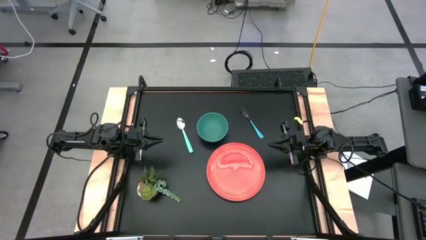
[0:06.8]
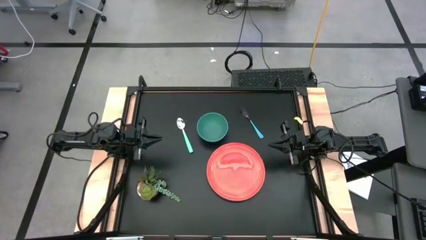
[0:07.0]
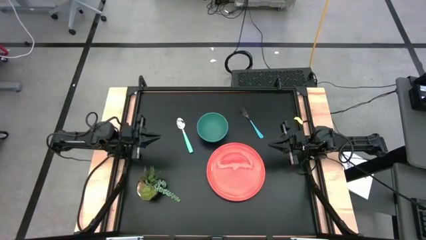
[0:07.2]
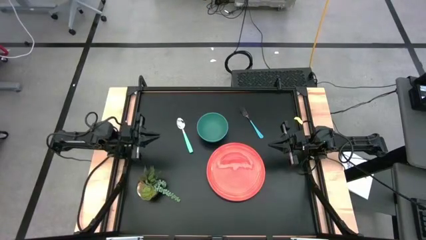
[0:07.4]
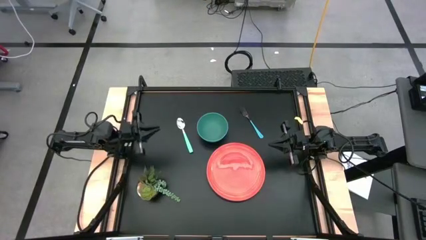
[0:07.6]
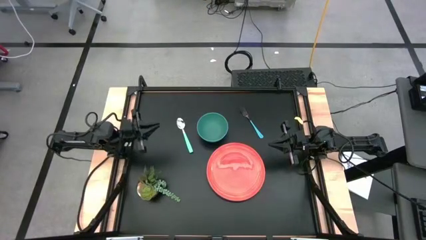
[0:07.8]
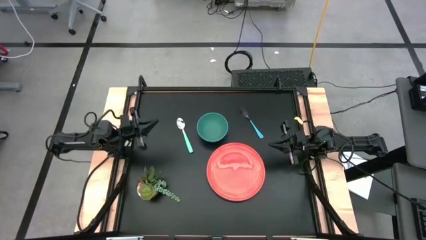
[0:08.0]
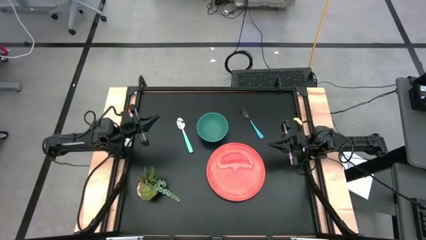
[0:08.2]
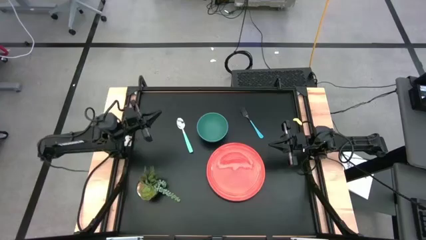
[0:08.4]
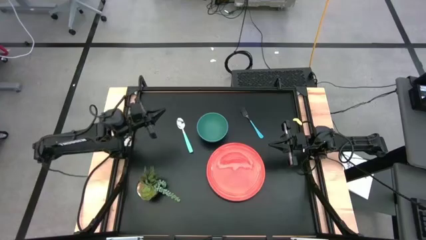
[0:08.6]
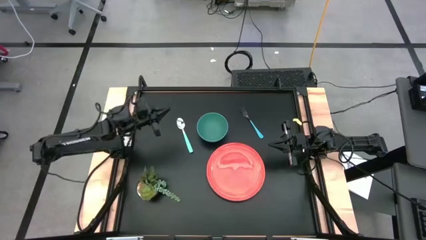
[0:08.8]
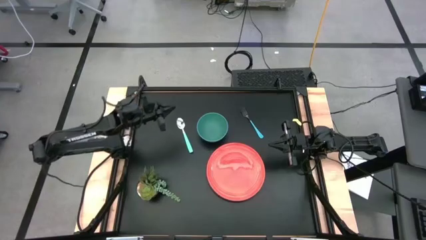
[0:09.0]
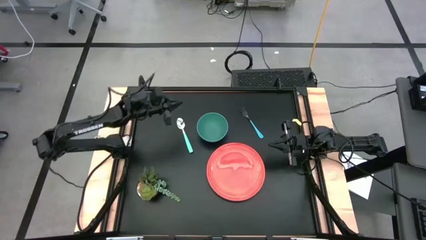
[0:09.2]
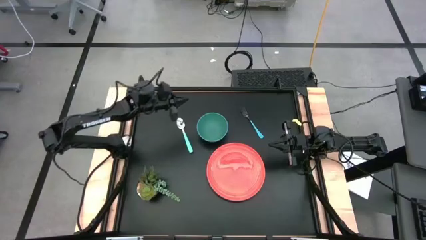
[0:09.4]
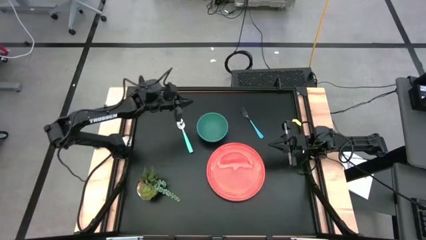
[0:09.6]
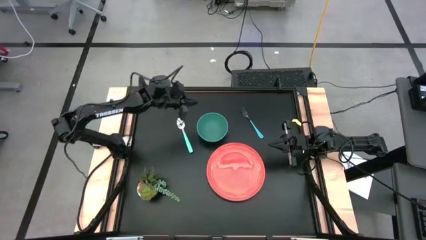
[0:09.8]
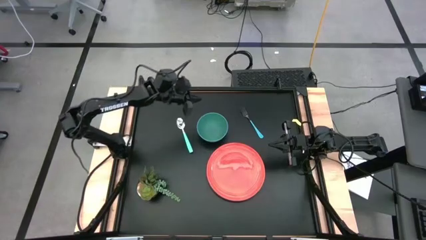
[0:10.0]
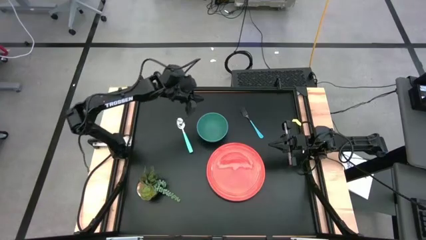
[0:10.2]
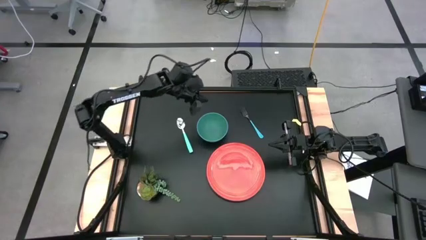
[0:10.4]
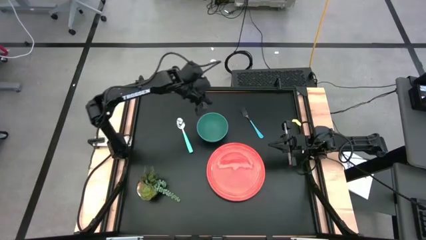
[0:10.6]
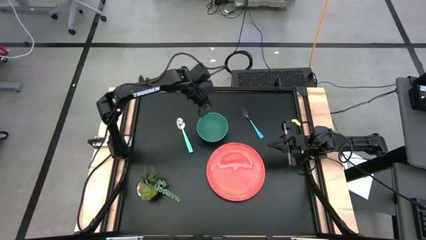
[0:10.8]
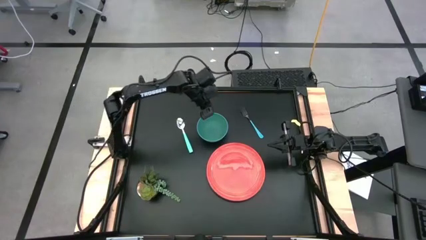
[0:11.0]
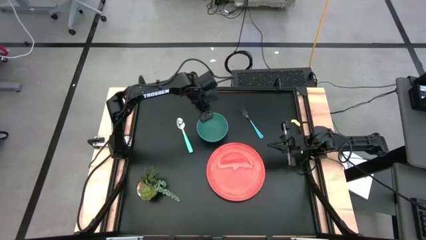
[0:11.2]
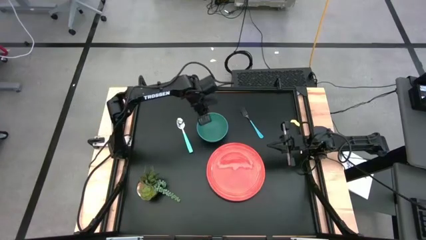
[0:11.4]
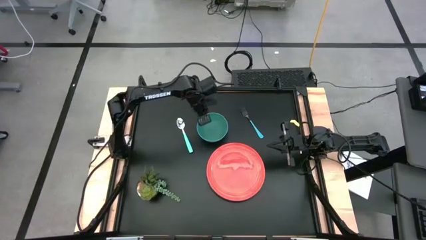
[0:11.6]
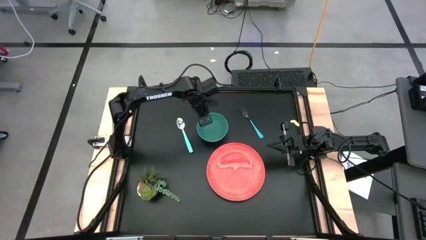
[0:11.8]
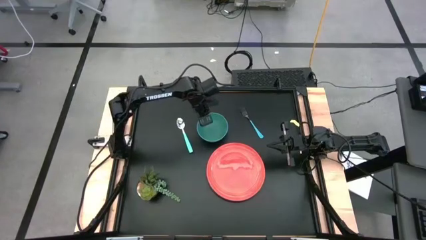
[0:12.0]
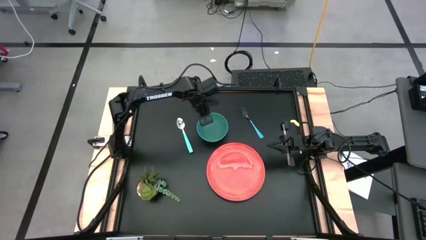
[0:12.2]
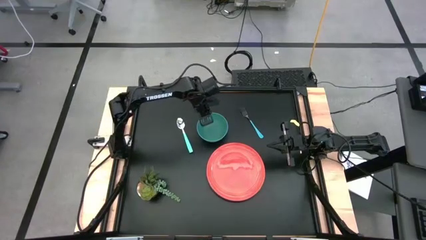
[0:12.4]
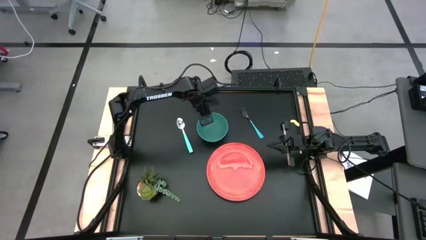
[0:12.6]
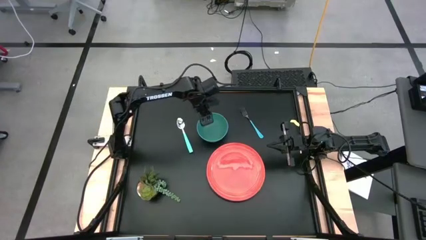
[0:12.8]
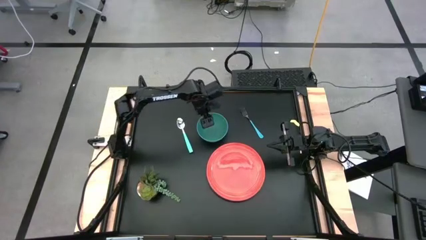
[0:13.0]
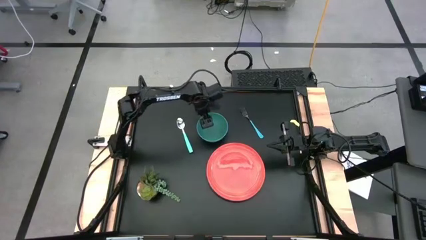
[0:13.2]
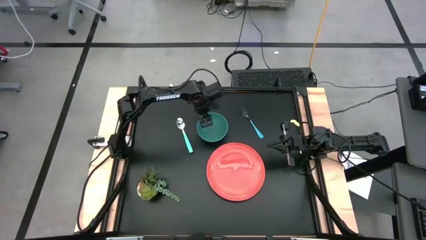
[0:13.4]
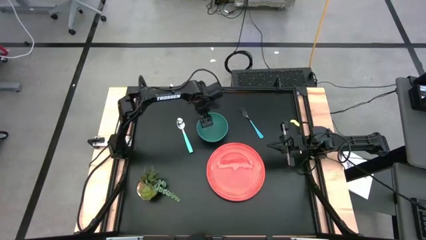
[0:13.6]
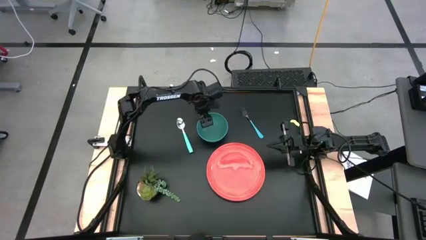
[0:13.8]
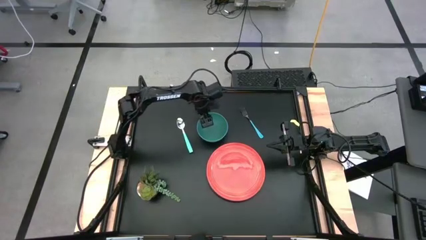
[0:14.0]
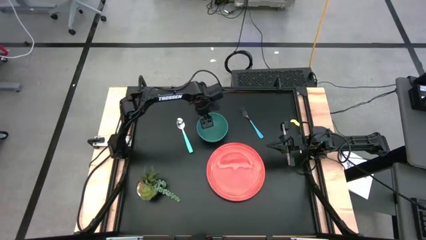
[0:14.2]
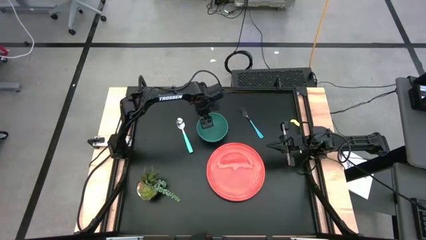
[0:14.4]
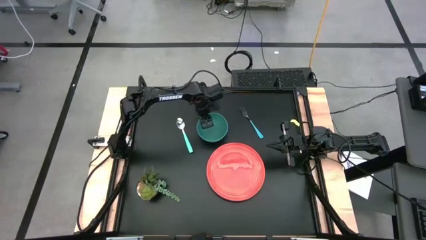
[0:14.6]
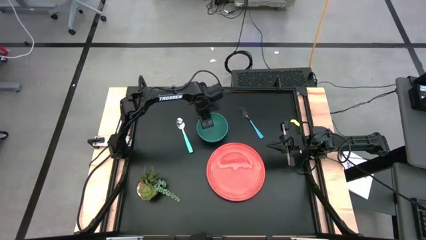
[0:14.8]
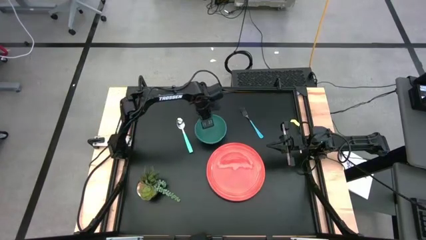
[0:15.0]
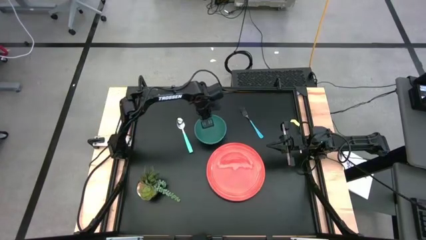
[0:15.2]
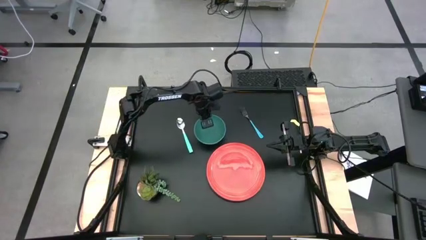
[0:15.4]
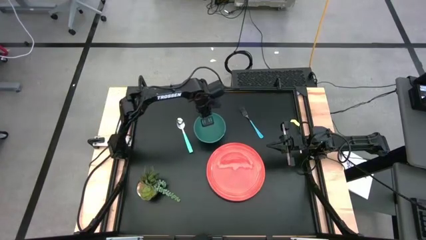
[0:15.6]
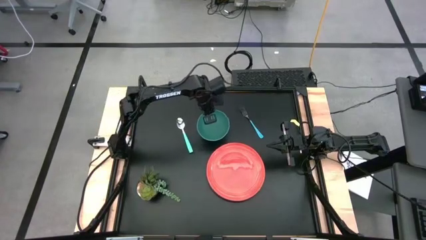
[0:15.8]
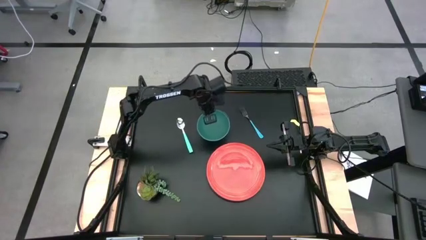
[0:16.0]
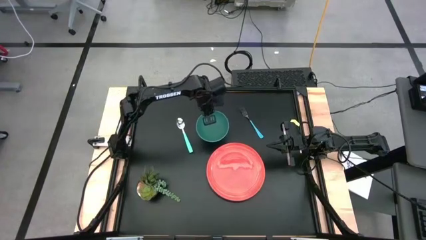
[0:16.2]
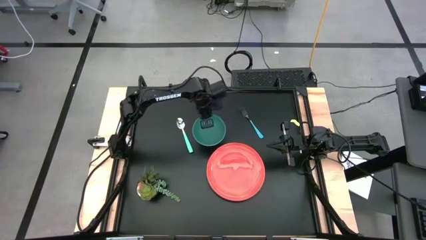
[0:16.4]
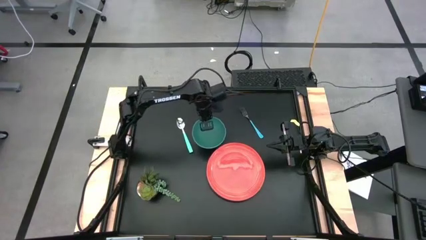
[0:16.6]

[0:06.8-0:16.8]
Task: Pick and place plate/cup/fork/spoon on tray
Put the green bowl on top of the orange plate

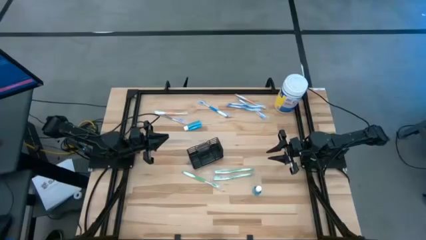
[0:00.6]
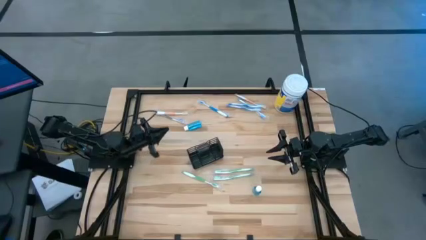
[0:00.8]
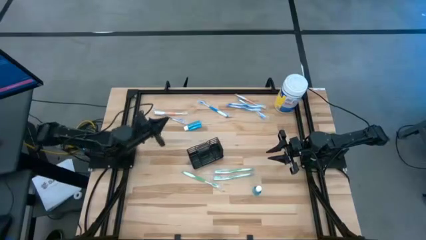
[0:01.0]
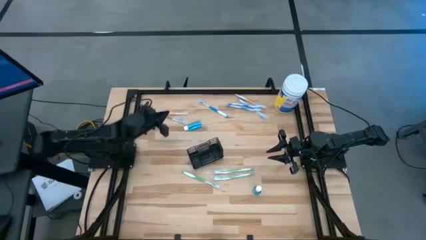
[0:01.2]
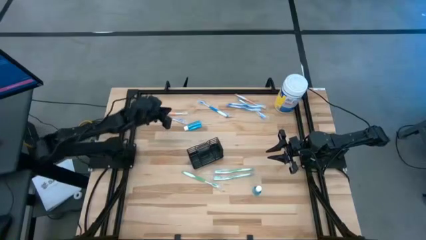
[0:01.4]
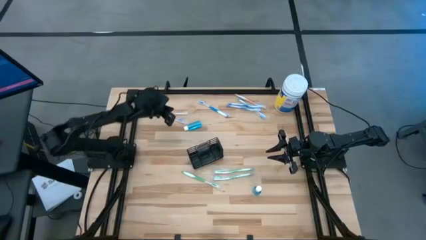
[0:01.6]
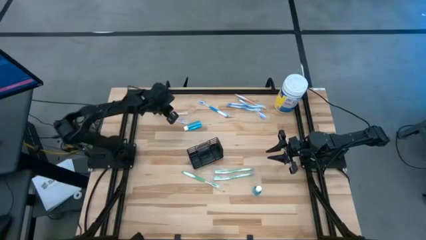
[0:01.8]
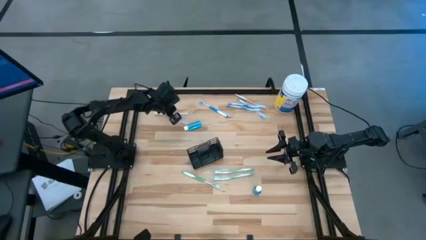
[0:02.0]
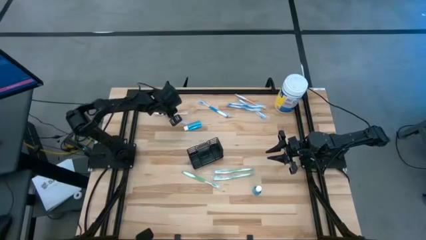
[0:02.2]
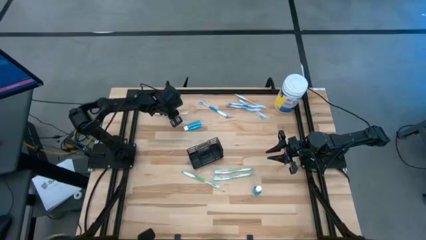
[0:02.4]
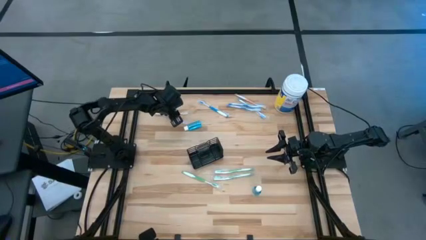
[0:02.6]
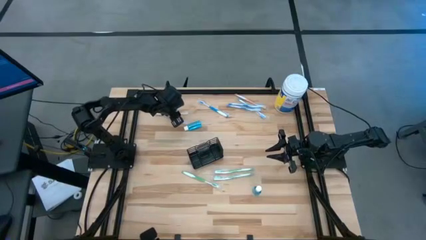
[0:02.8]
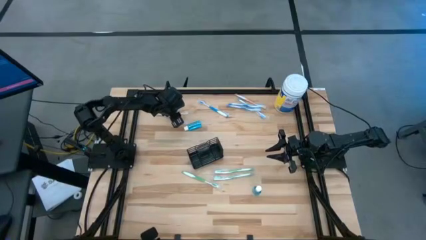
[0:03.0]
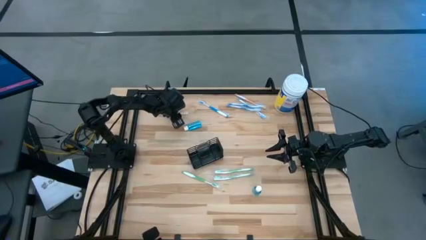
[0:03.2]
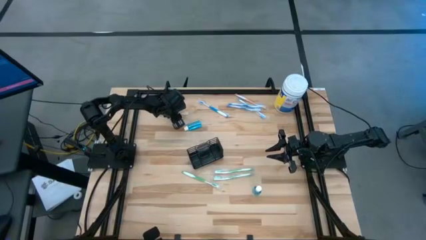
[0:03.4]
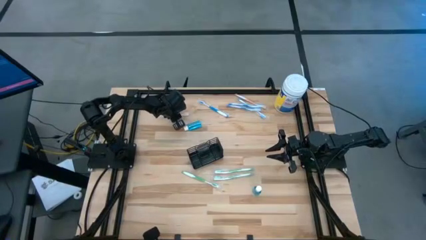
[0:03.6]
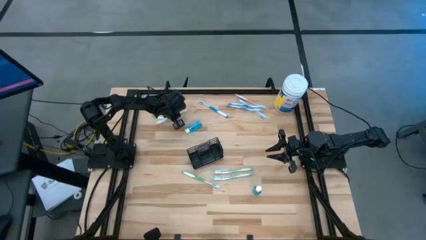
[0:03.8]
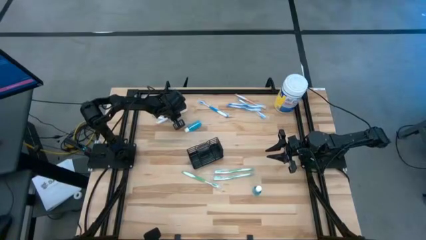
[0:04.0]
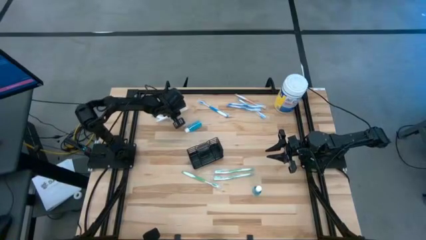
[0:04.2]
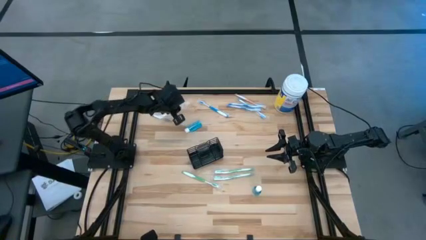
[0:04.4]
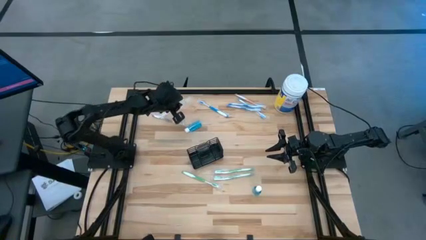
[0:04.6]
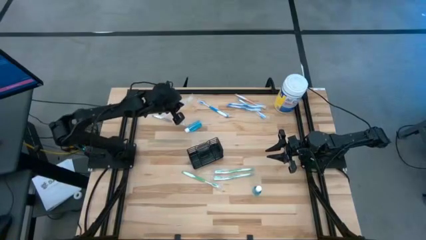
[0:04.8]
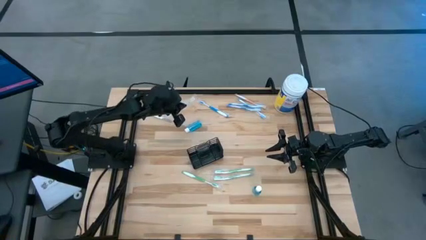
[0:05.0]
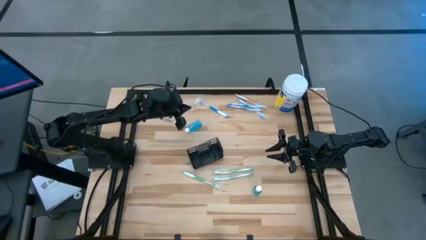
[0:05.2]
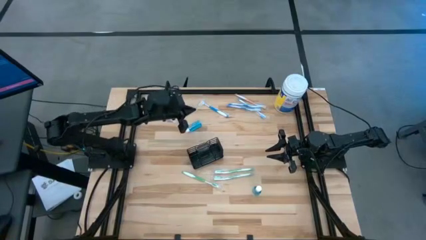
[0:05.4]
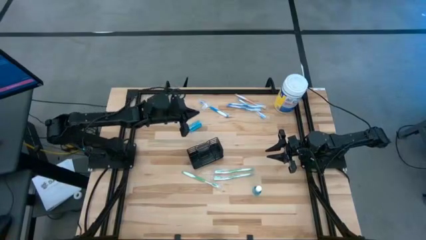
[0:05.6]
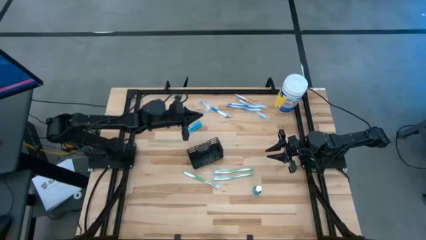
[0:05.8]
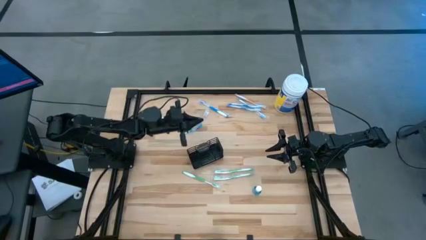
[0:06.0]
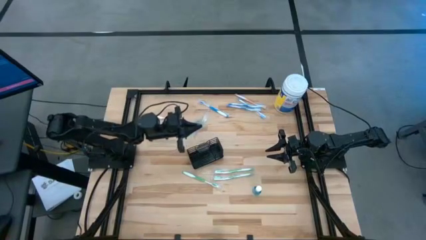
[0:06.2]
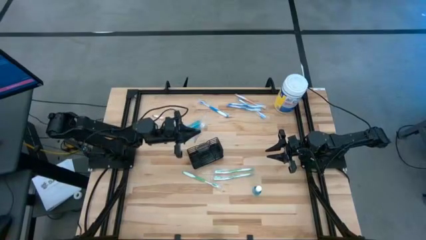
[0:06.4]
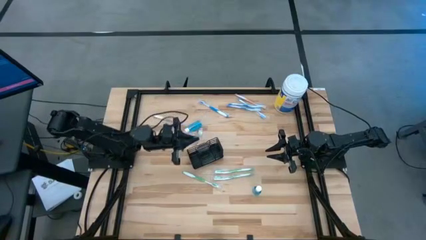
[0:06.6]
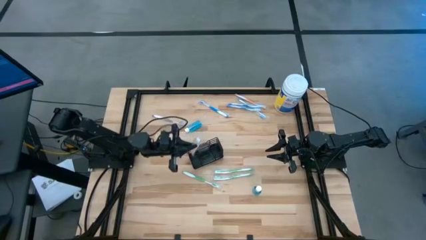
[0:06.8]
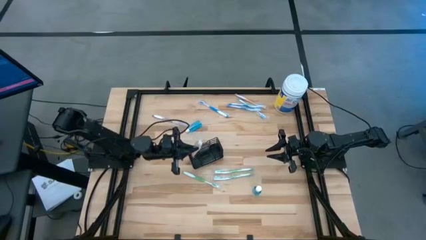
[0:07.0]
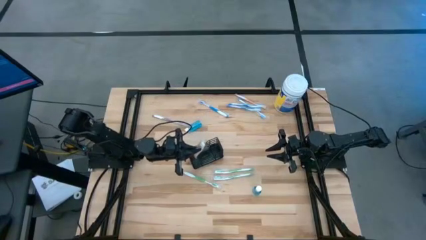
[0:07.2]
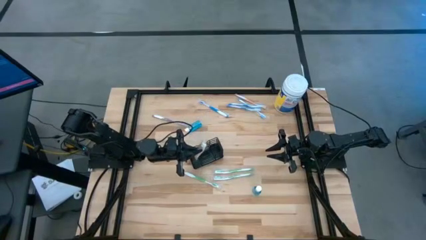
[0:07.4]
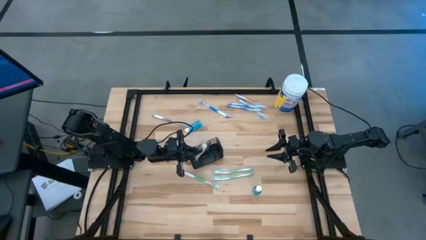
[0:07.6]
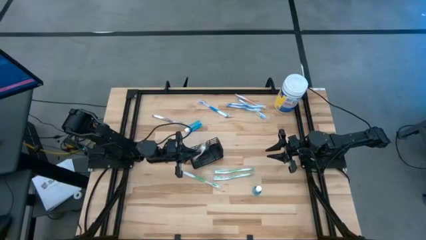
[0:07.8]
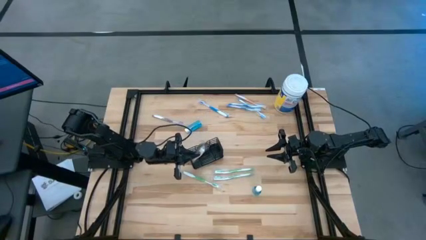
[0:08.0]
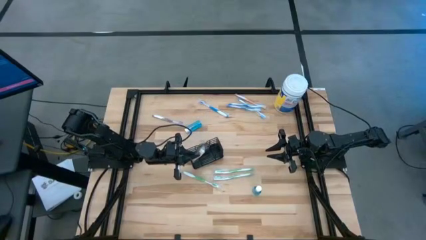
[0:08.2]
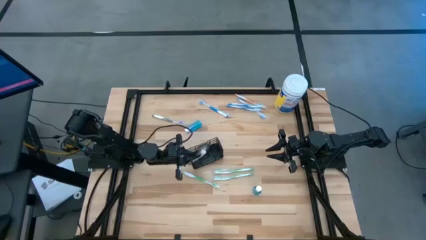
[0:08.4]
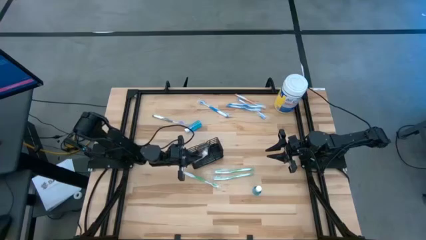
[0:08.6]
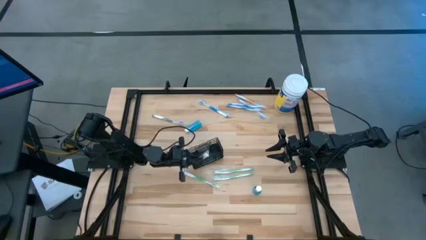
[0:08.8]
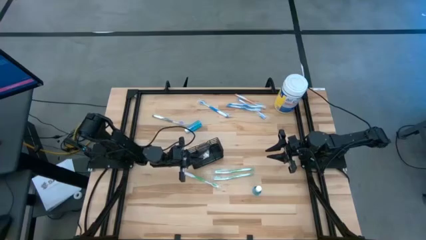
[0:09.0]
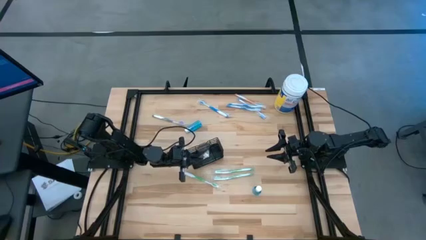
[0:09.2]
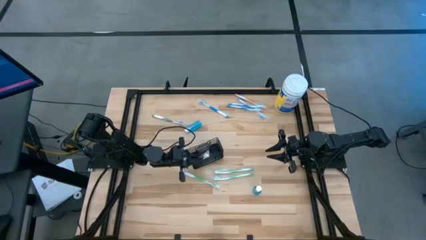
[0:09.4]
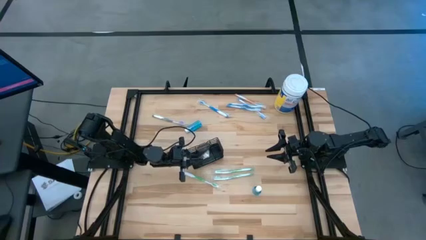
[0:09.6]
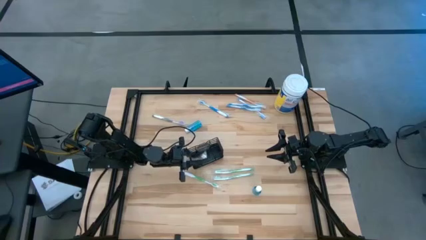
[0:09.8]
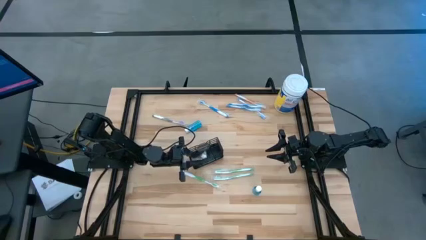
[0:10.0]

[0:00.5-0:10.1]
Task: Pick & Place toothbrushing station
Put the orange toothbrush into the wire organizer
